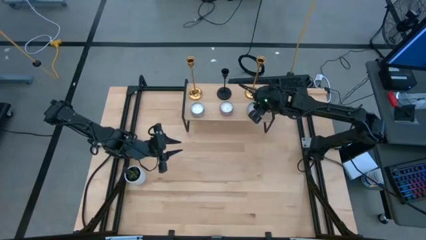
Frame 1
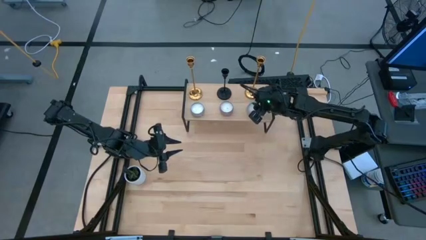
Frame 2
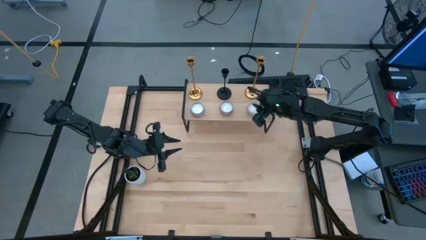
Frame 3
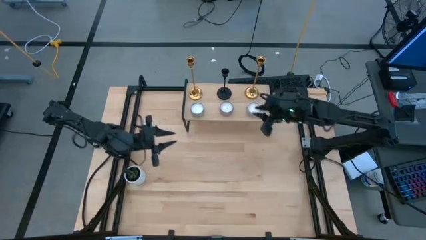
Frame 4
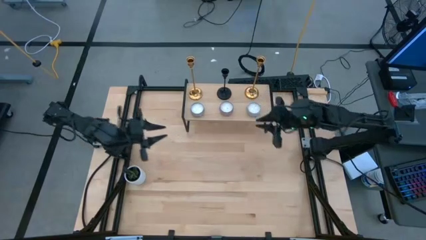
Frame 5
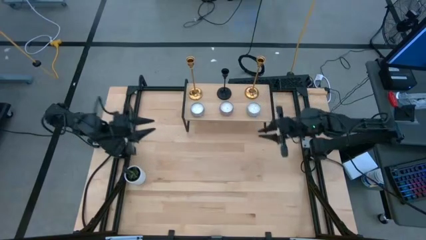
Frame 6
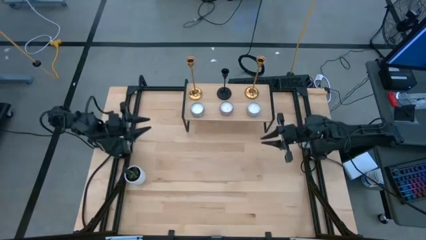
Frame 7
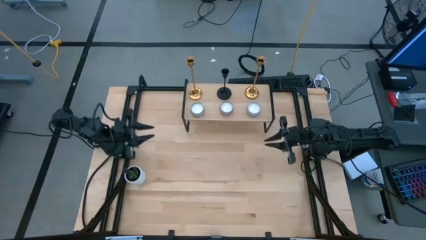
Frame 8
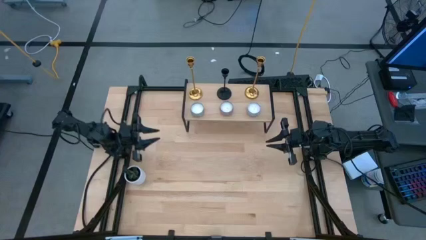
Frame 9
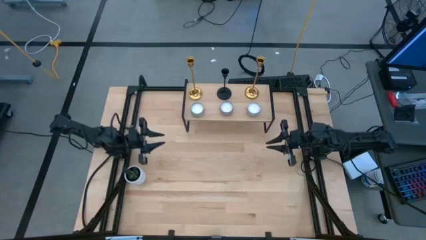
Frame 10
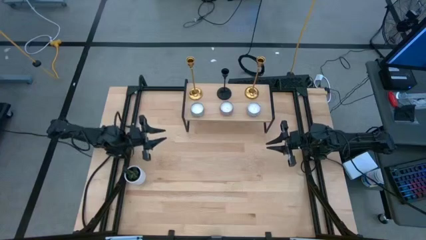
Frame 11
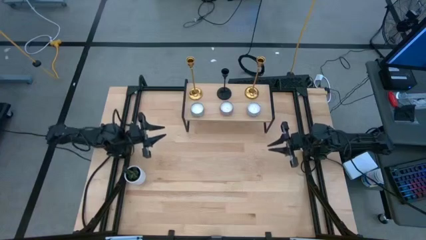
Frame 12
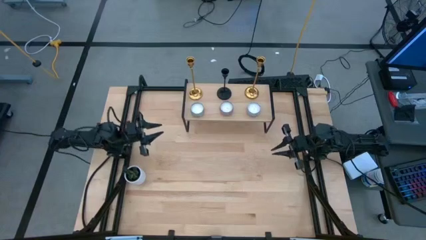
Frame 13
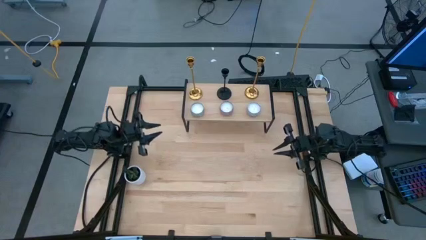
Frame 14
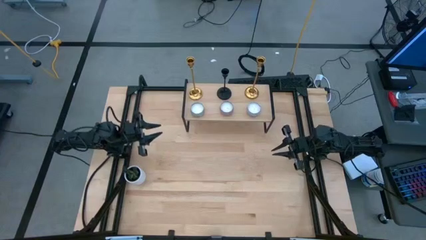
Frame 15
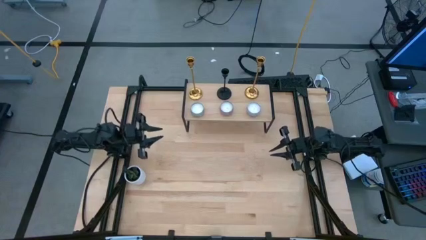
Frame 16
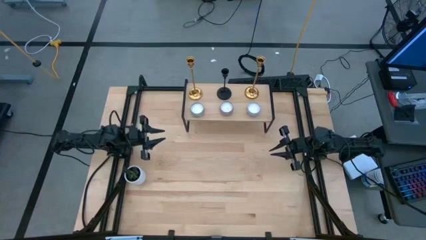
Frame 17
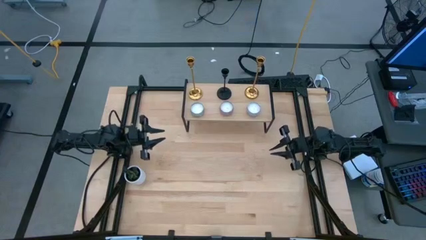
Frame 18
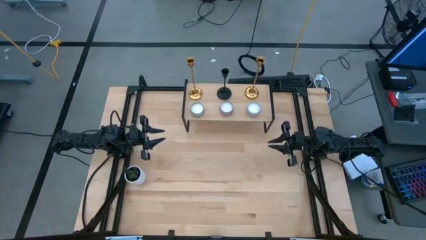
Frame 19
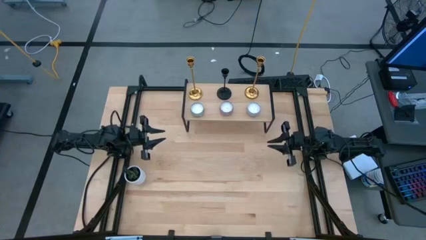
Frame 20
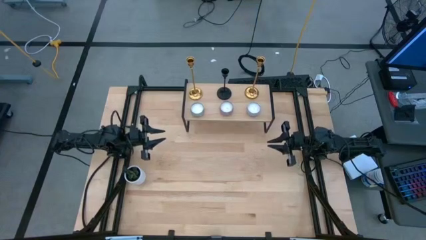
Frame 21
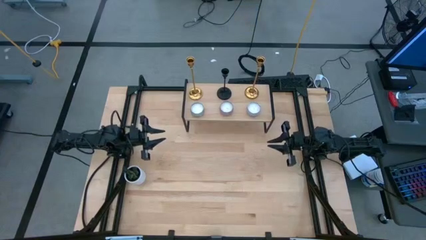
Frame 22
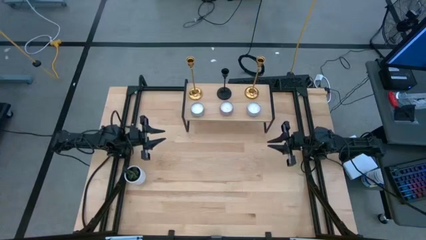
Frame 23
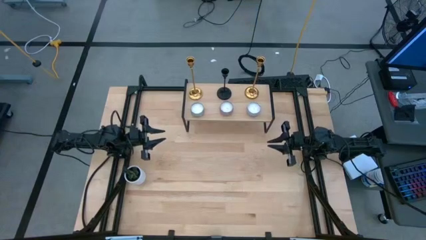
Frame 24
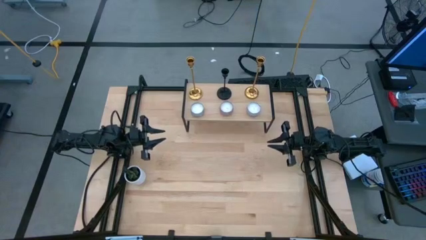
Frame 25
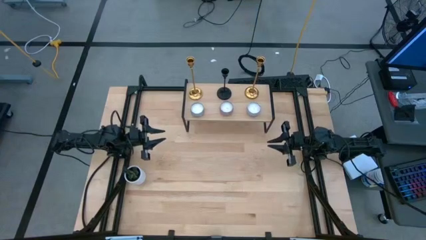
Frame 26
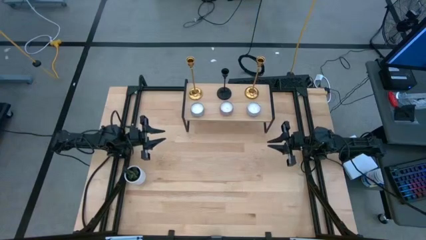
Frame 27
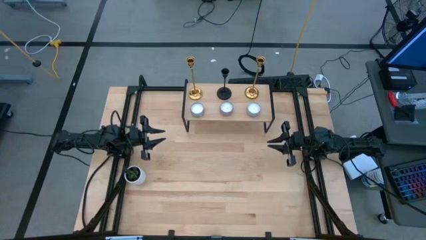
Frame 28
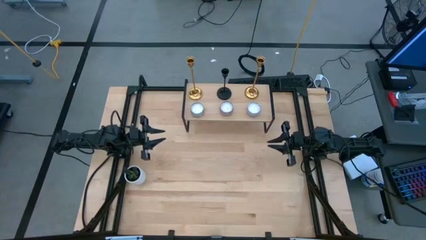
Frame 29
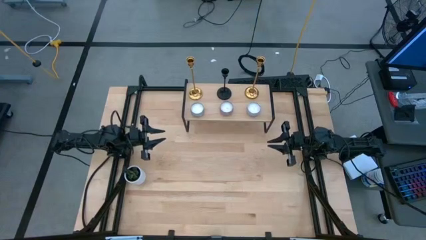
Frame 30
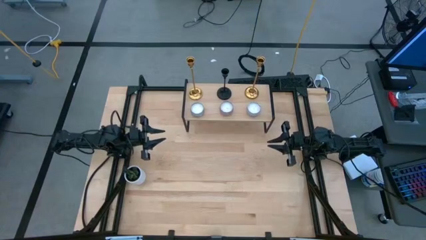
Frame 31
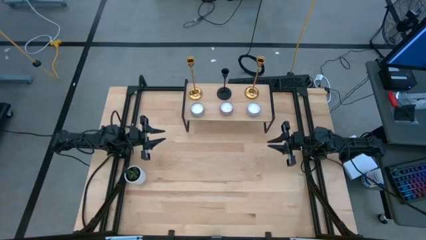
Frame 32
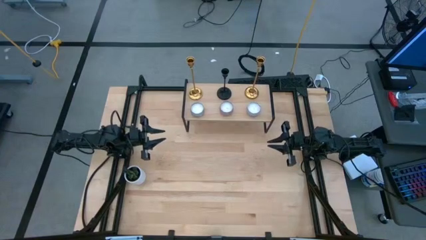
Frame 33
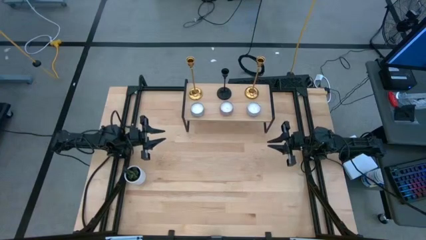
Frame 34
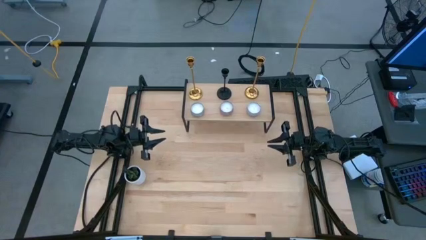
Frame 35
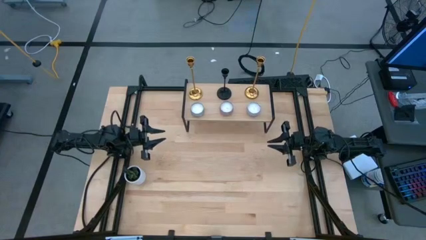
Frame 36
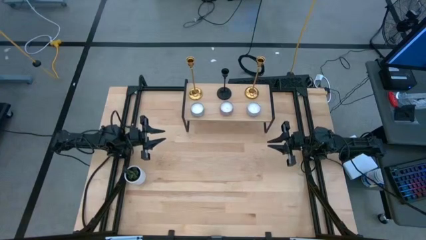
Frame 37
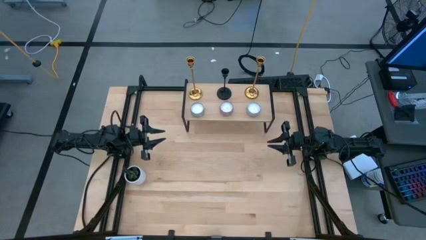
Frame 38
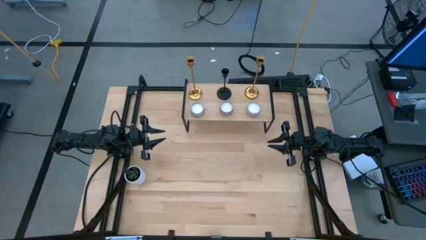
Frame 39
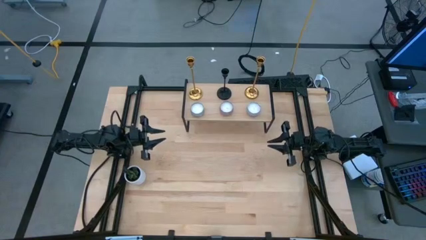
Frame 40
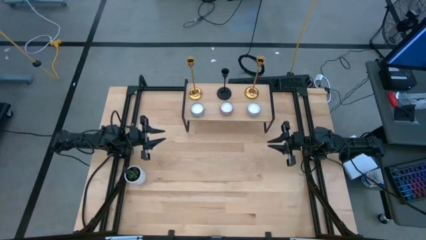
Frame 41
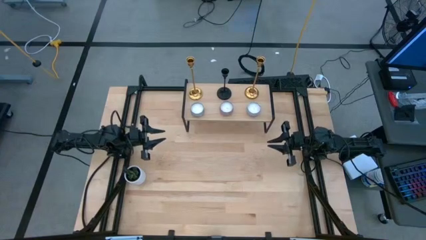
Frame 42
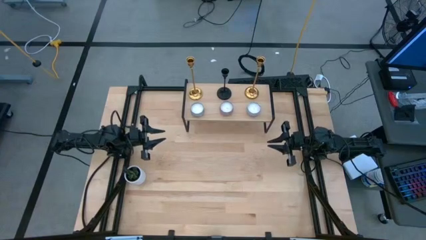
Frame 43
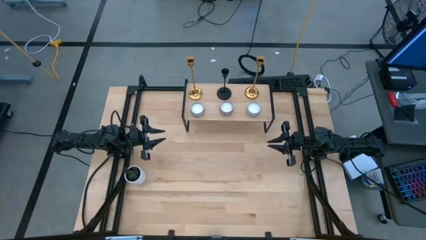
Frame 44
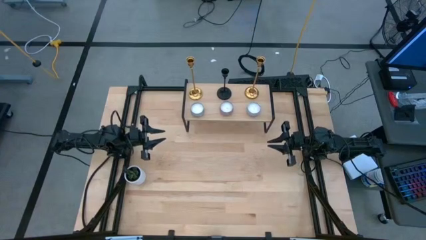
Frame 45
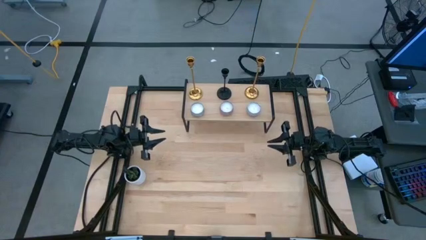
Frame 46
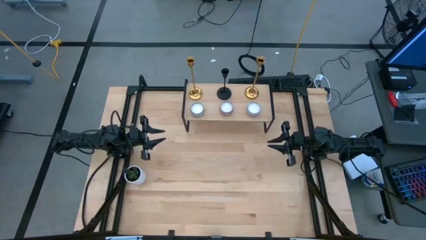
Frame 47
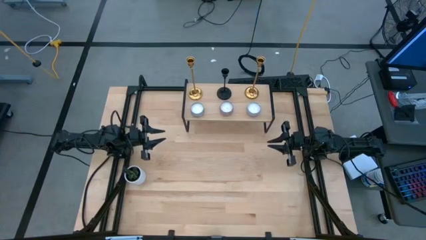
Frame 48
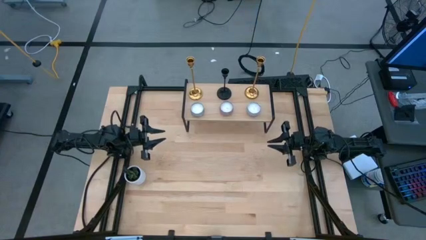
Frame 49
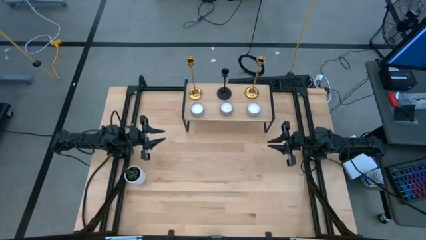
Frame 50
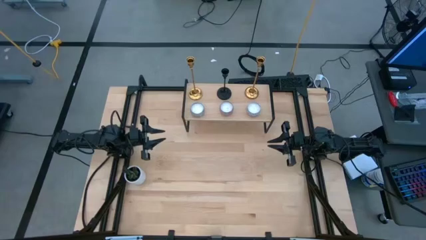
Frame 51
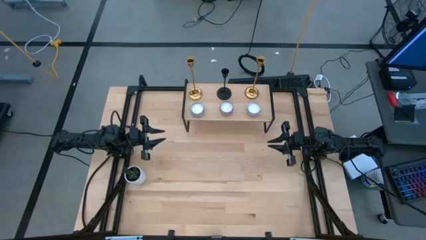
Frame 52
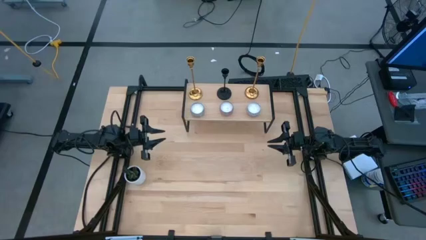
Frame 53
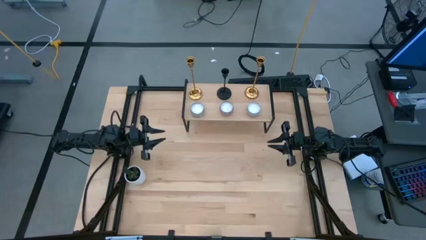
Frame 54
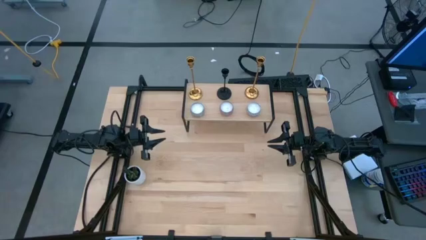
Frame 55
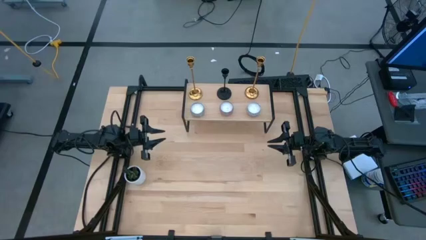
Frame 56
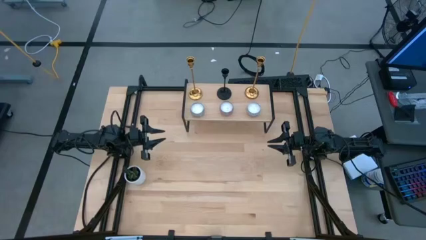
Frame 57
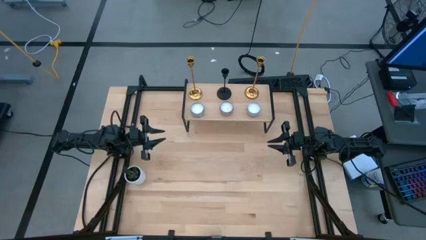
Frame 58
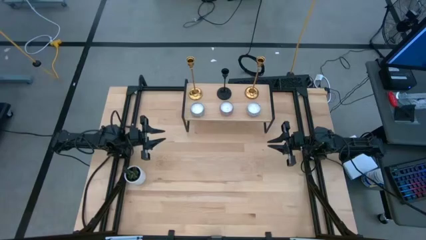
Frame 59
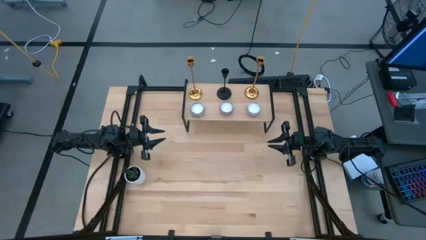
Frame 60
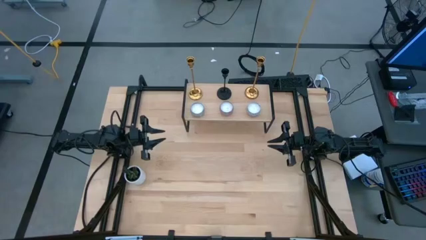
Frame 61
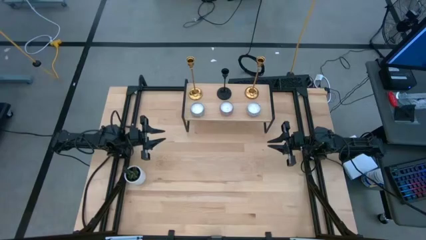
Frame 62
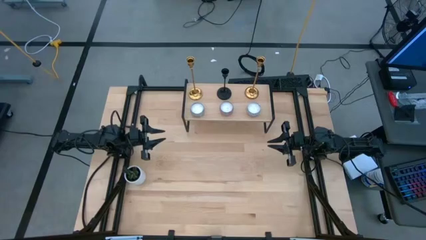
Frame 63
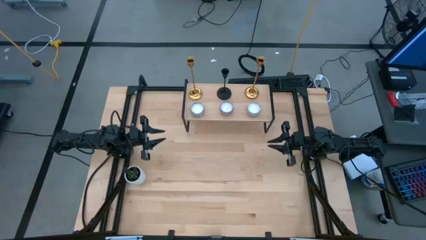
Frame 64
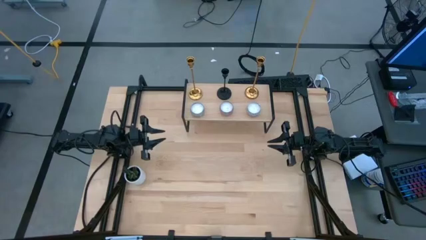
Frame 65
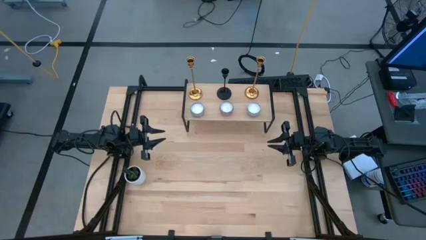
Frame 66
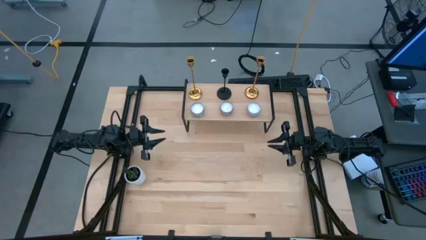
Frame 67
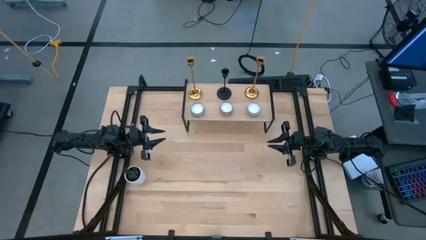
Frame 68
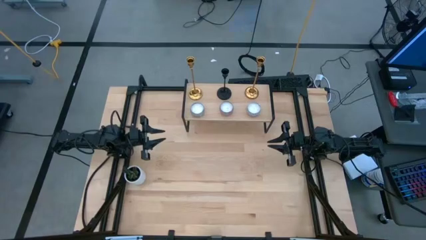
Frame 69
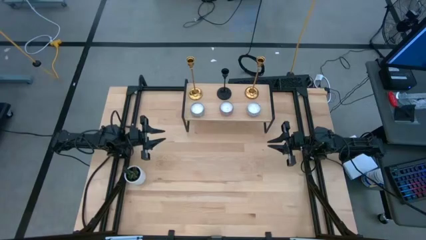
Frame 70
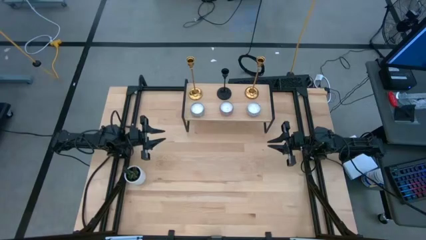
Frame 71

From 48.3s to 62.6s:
Task: Pick & Place candle stick holders
Return to Home Position

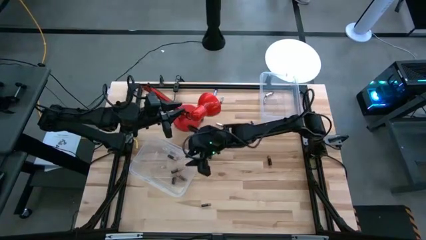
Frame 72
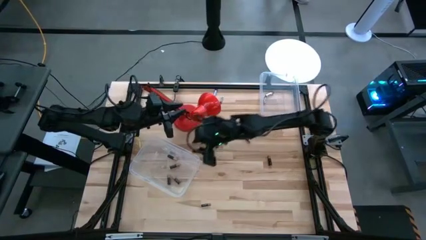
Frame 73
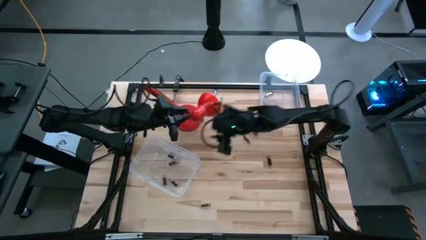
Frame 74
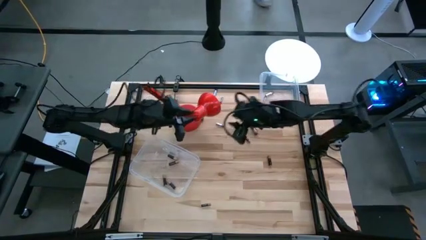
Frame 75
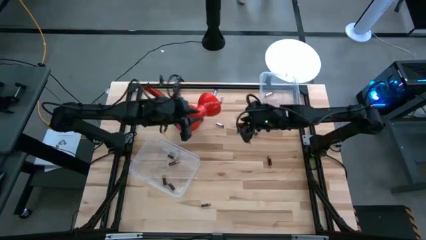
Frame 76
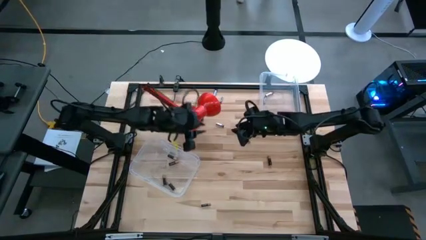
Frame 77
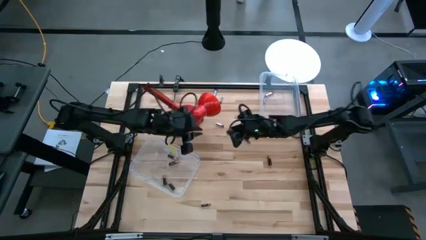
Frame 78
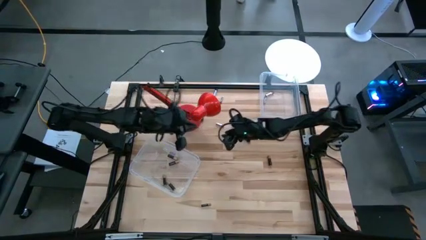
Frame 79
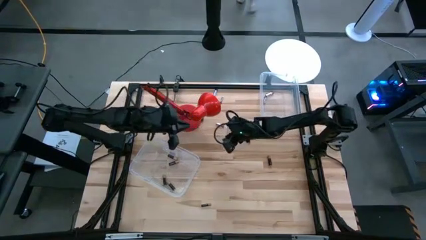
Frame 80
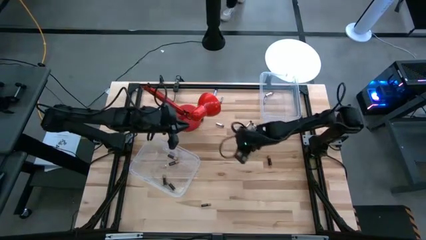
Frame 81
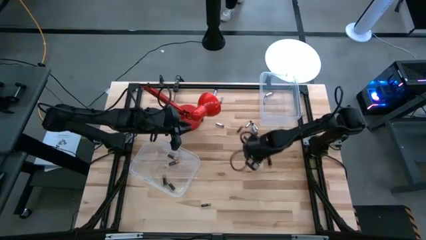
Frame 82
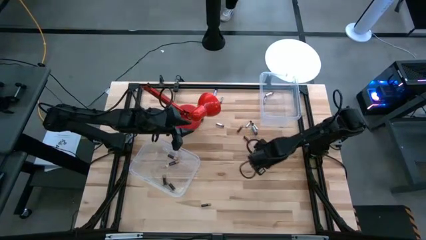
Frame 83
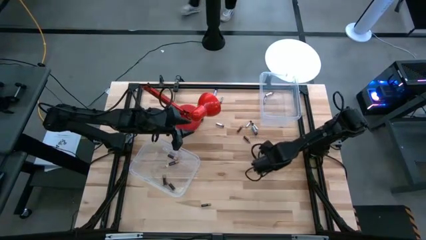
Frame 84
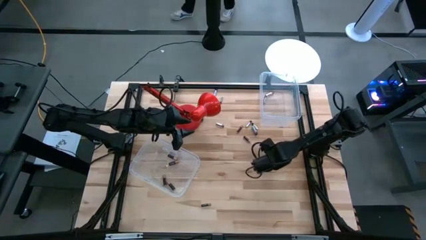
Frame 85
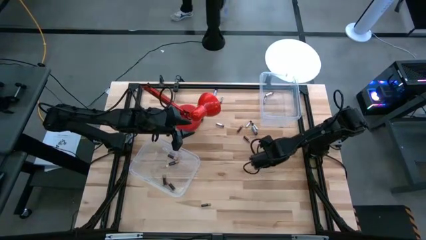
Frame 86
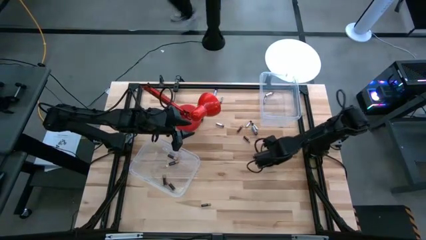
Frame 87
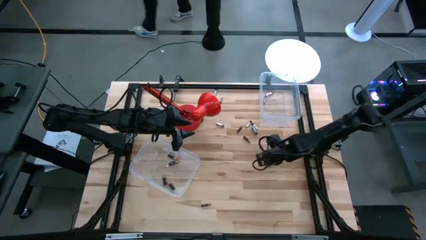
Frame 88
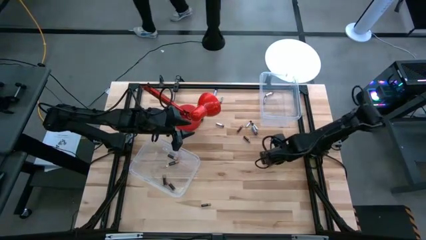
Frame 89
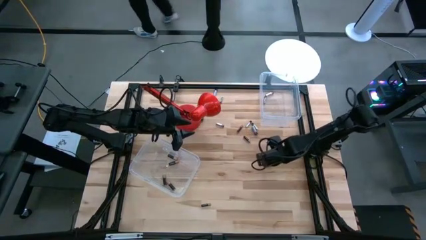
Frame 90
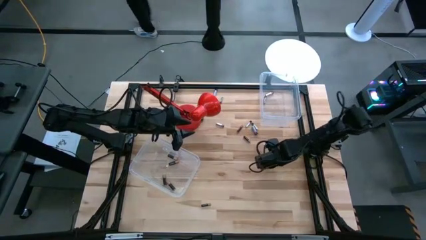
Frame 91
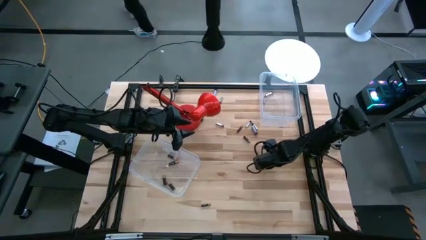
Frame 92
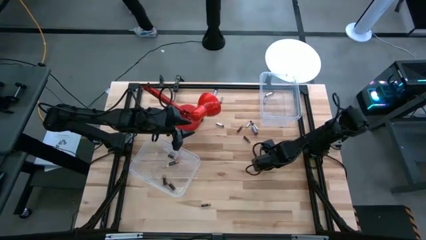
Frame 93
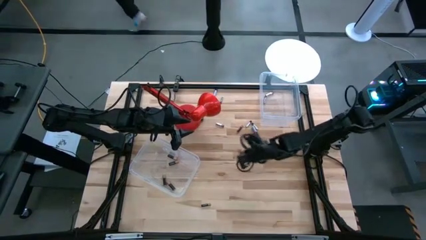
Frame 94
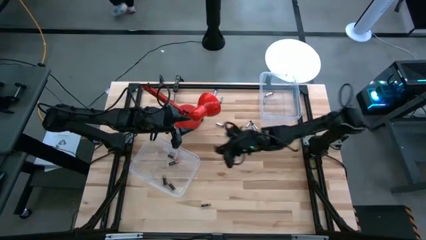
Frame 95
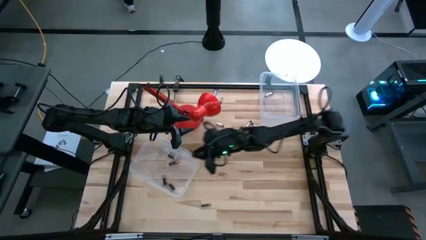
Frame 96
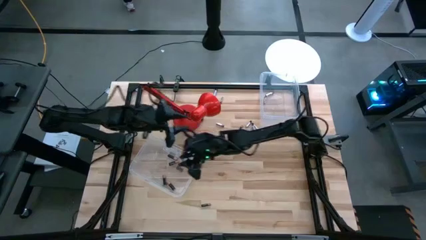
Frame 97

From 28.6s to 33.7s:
Task: Sort batteries
Put the black battery into the bottom transparent bin
